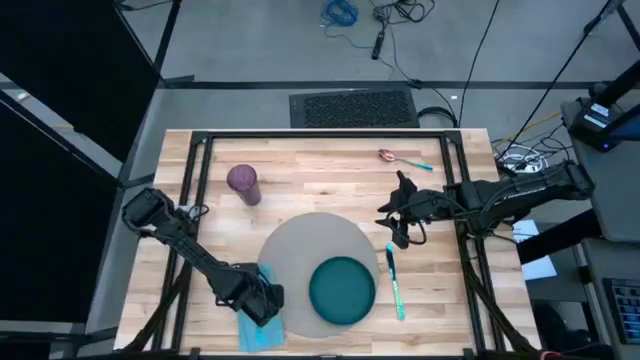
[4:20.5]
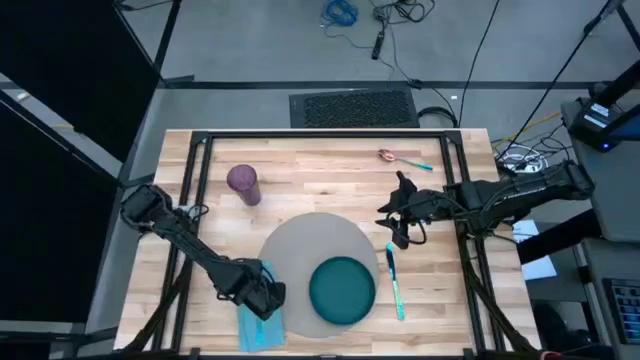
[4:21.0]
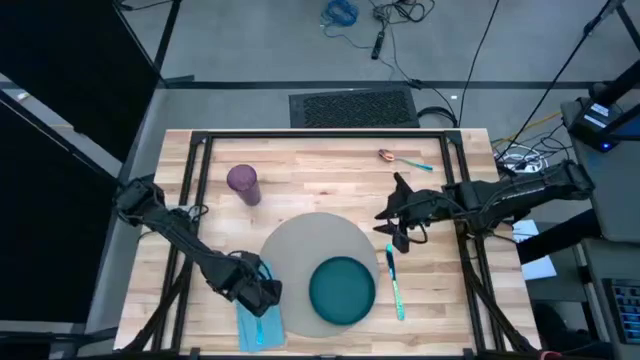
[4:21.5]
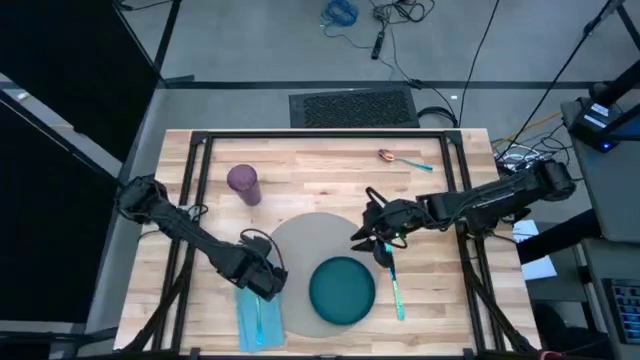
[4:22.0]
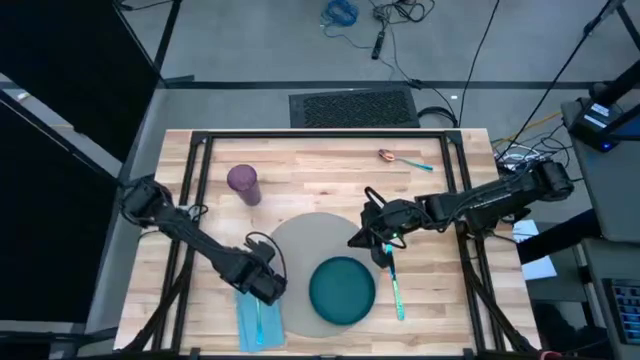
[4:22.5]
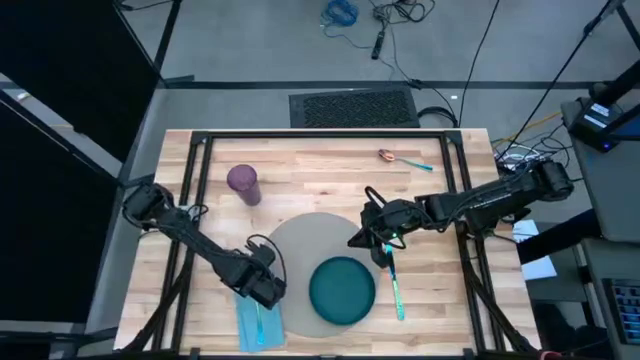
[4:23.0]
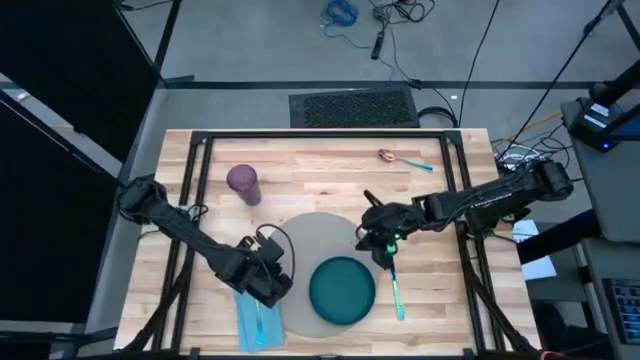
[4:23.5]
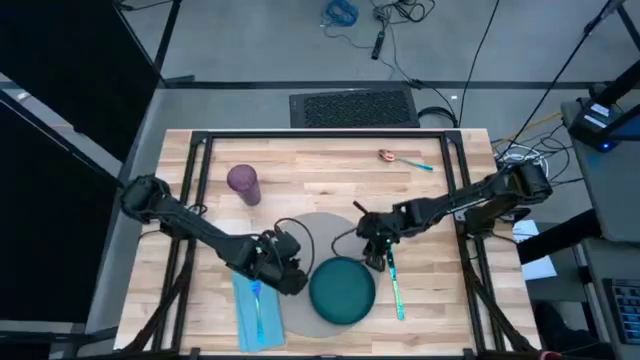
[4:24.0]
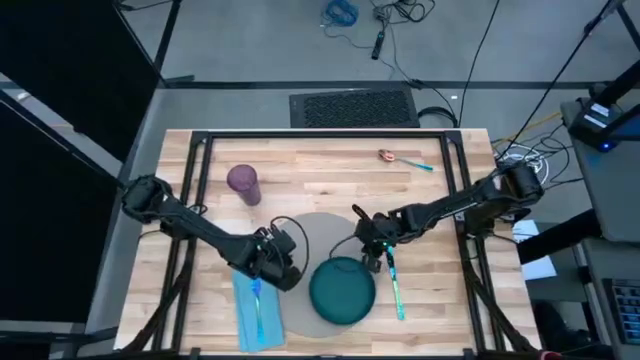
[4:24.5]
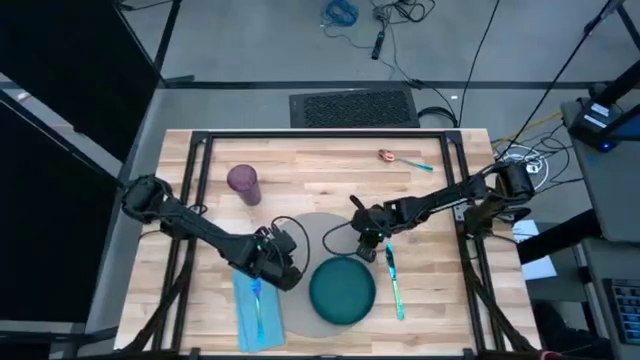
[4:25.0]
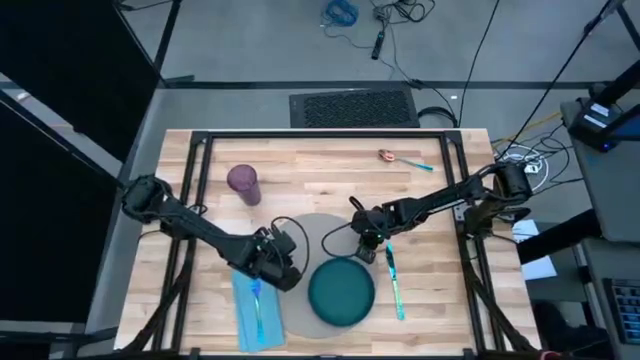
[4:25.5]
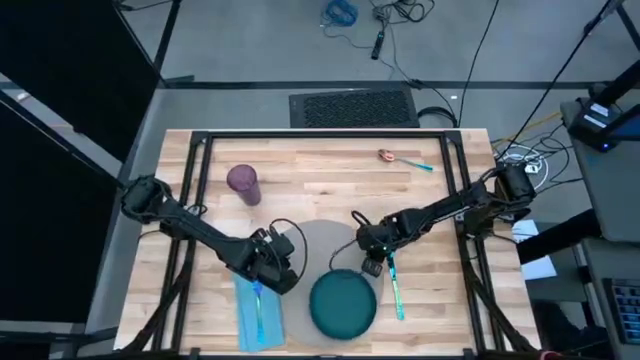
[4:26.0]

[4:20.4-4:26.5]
Task: Set table place
Adjust the gray mat

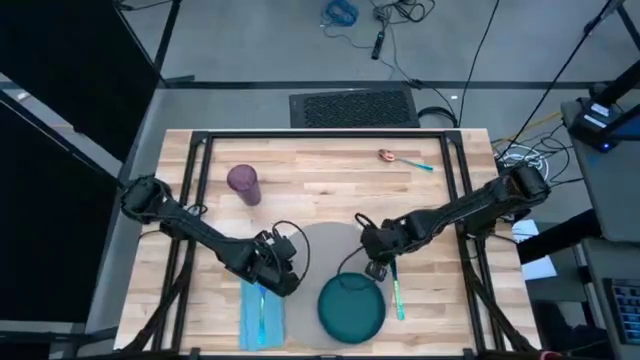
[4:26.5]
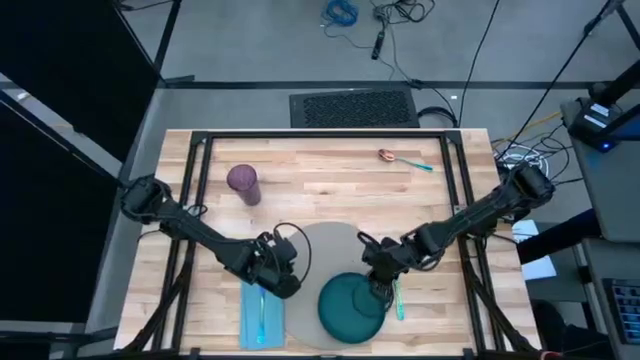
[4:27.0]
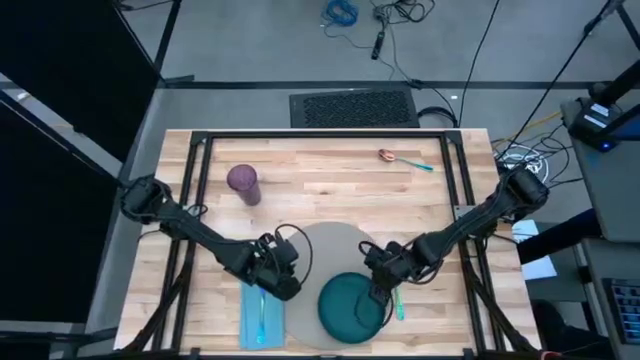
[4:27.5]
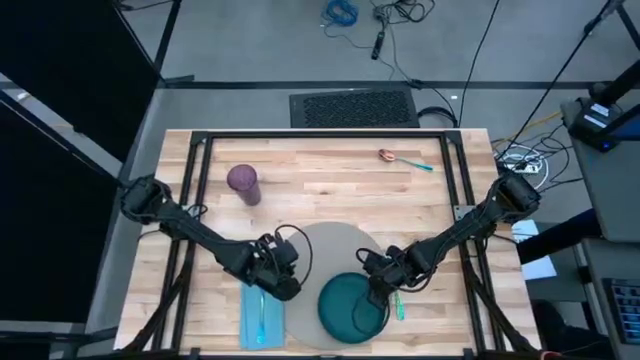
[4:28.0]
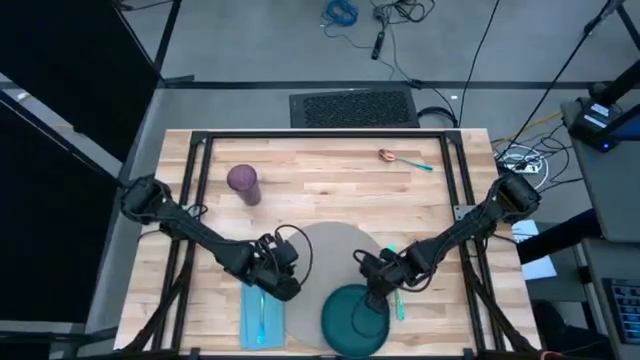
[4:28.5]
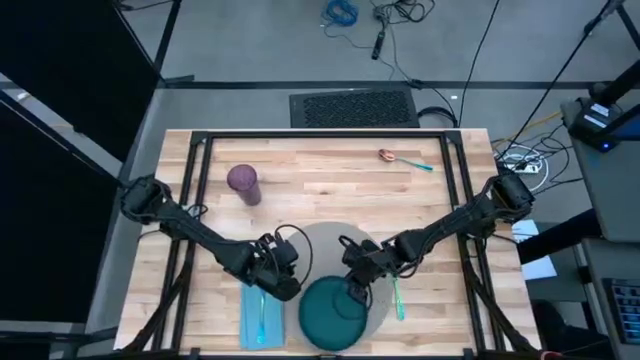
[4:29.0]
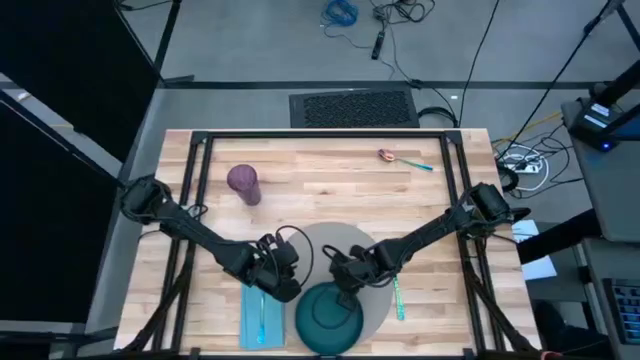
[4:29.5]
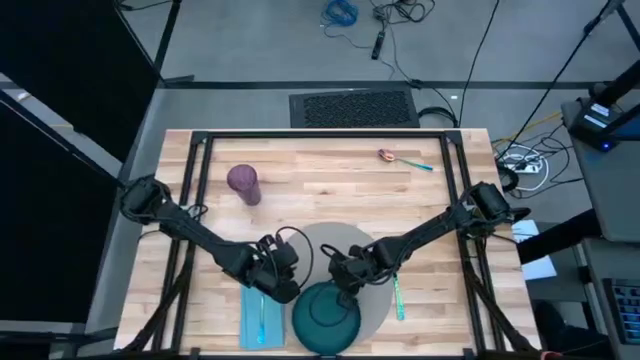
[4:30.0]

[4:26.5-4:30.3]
Adjust the dark green plate on the gray mat

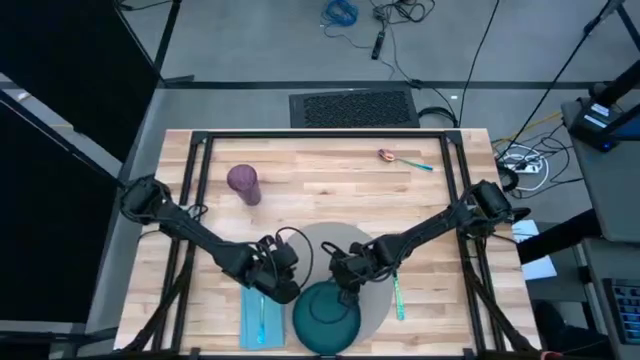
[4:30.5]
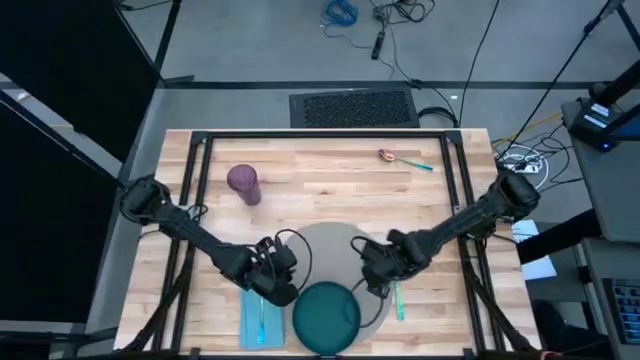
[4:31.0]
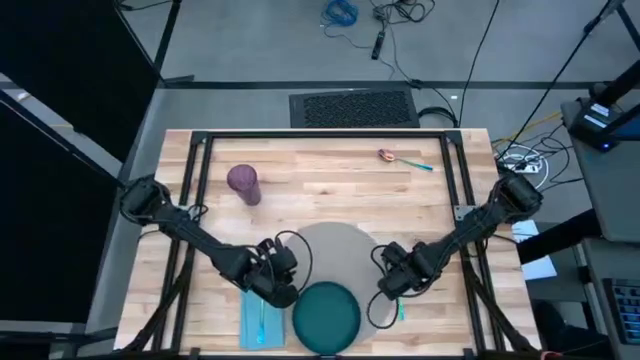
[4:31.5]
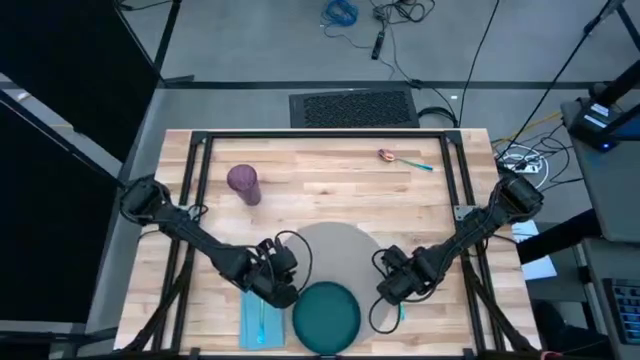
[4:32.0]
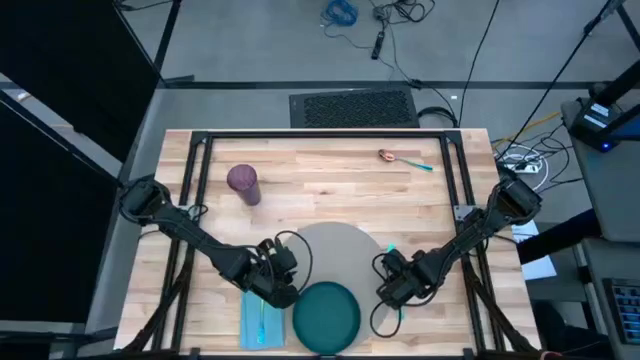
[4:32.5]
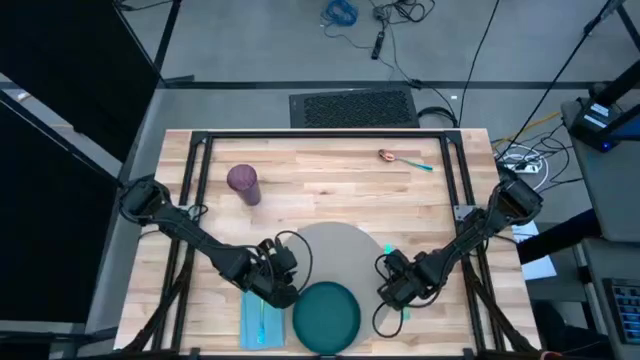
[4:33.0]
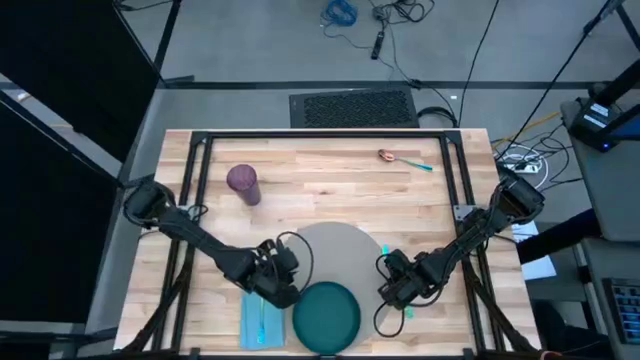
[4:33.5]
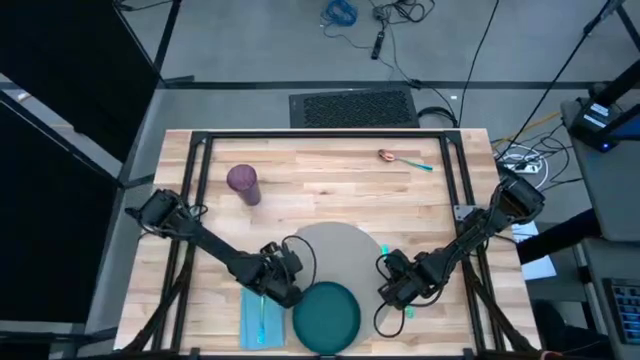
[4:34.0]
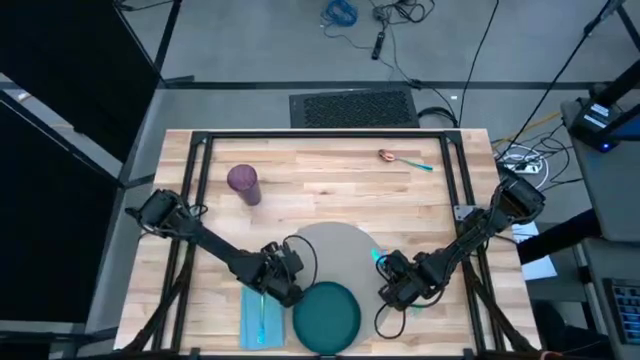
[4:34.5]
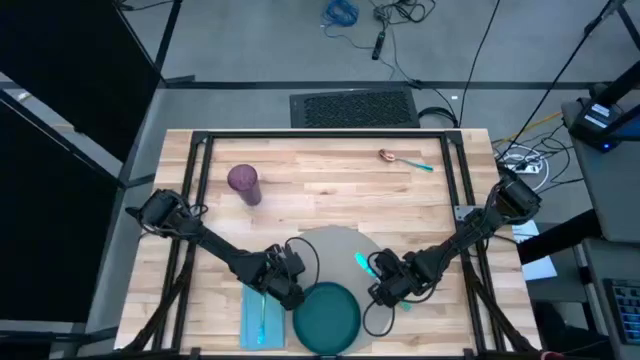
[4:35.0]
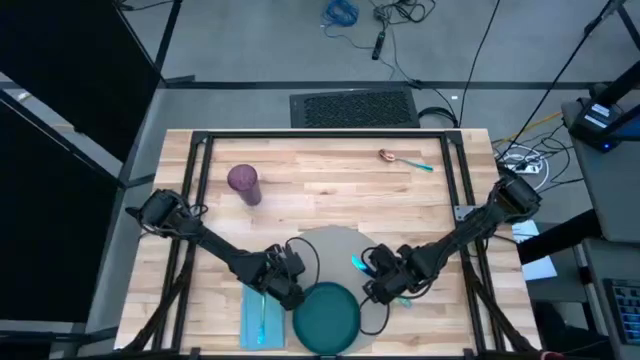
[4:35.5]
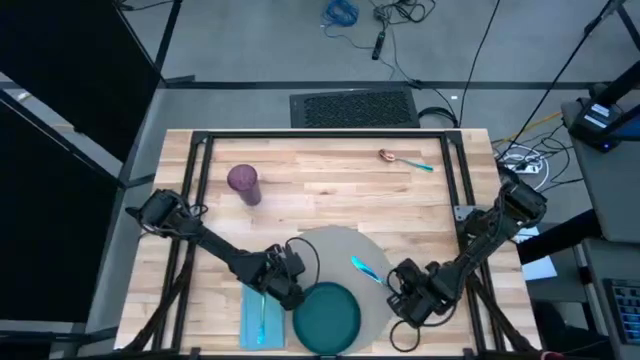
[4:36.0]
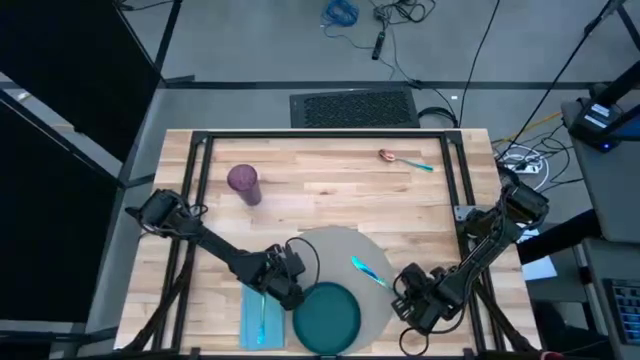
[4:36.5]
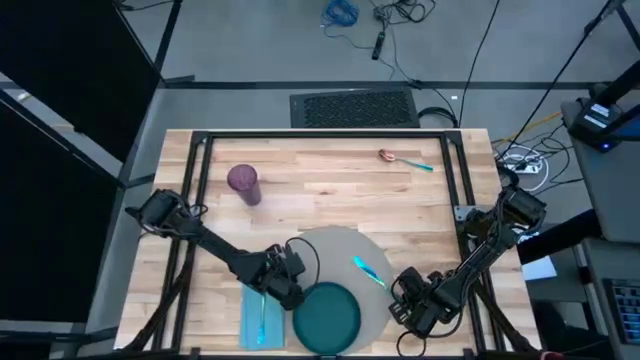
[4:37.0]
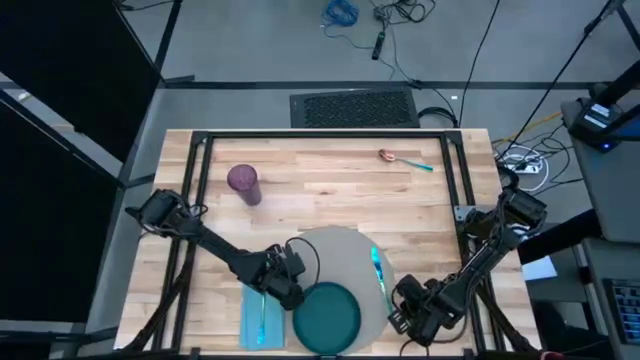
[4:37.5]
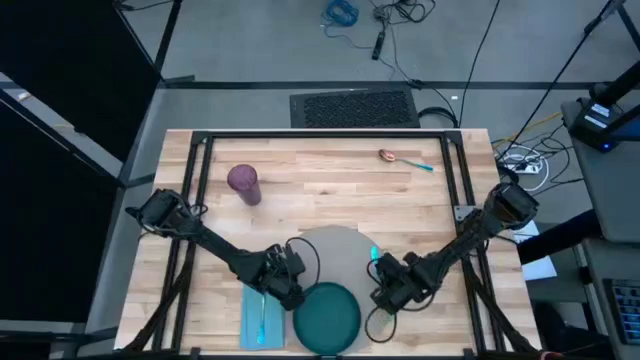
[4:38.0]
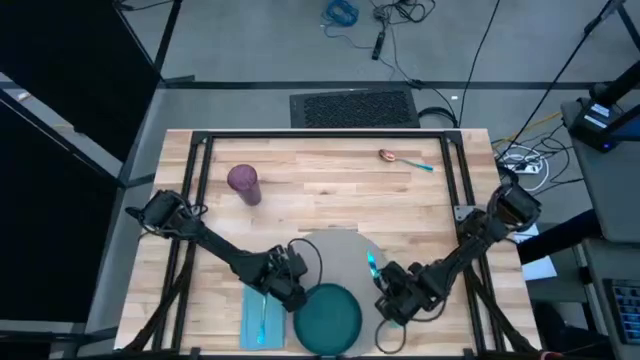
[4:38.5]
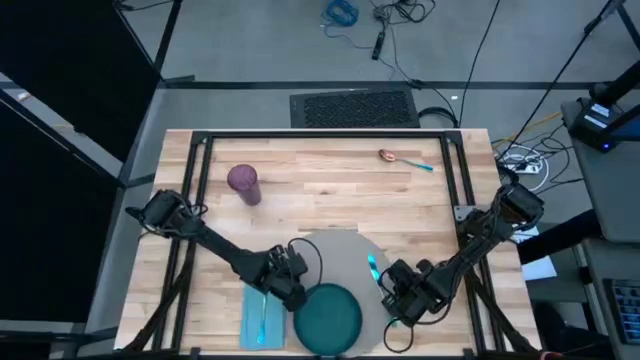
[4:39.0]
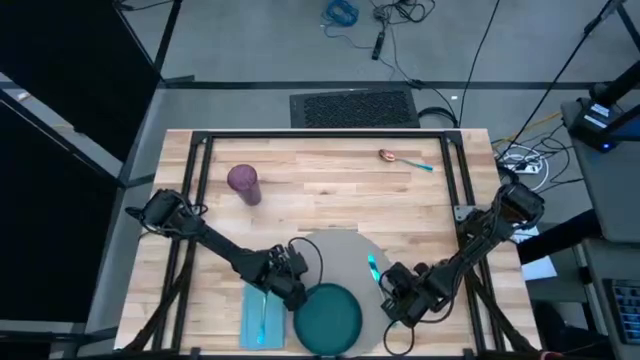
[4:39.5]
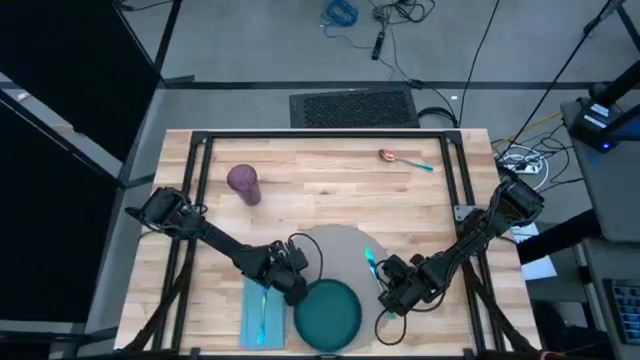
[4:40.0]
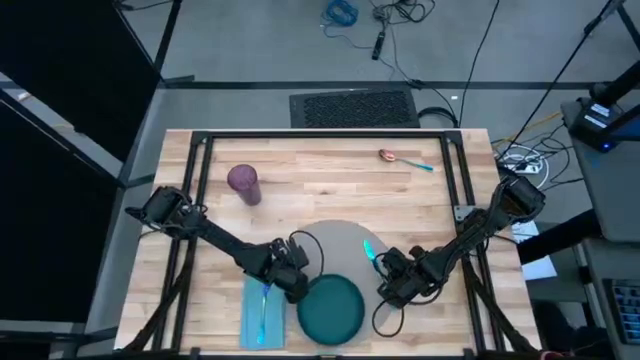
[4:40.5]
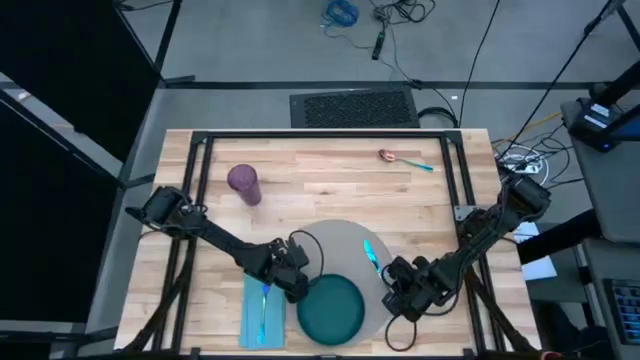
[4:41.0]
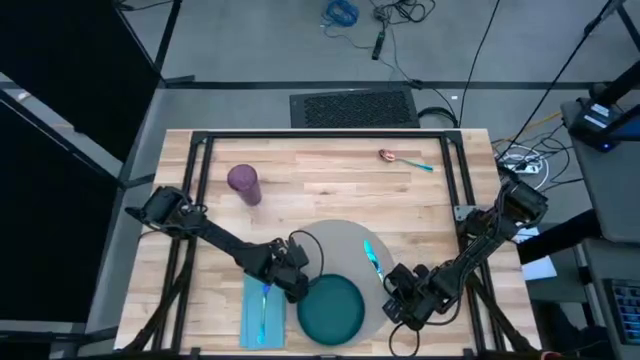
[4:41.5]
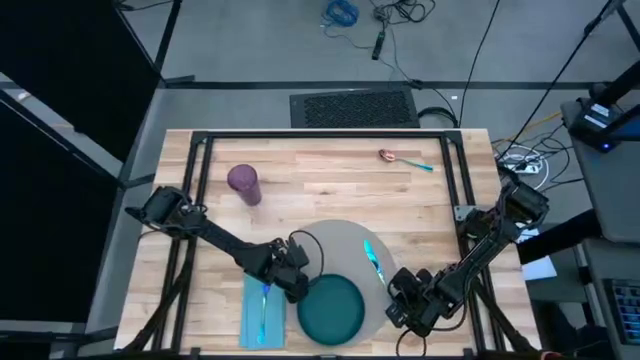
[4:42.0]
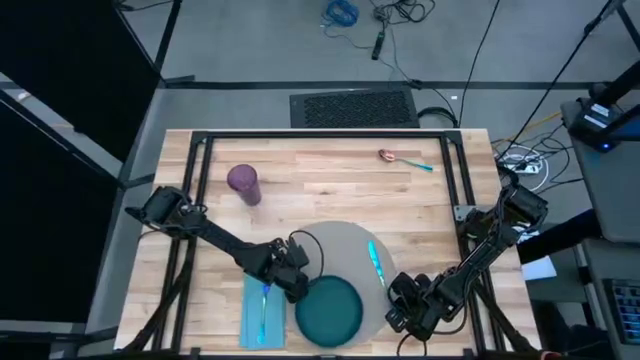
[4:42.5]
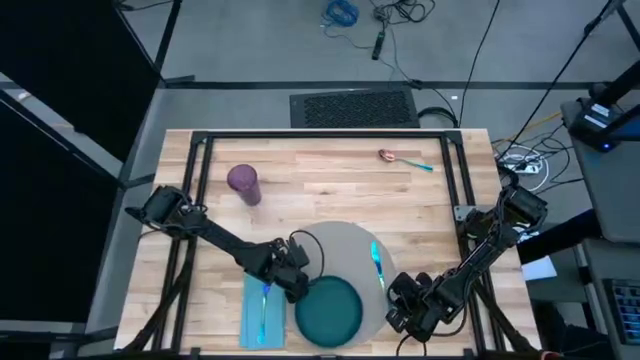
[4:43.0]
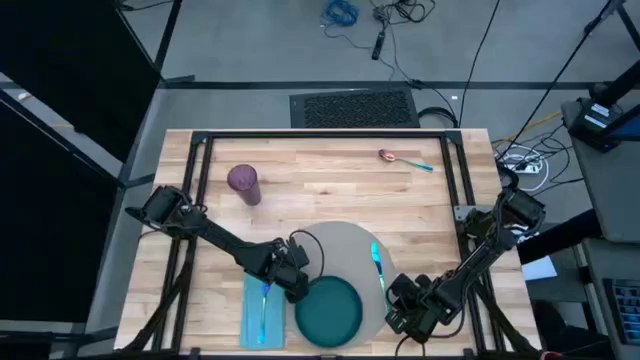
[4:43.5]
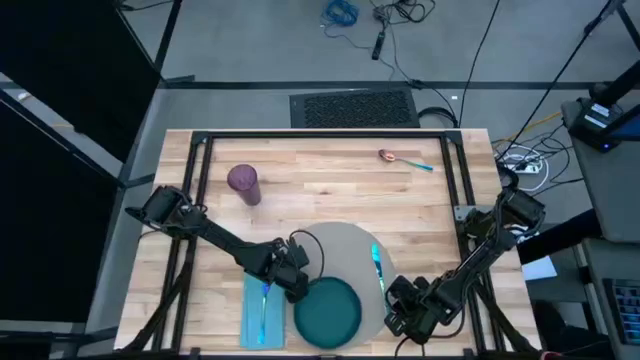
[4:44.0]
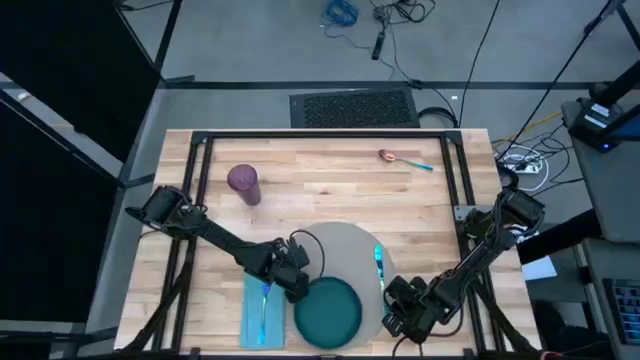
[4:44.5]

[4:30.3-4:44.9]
Put the iridescent knife on the gray mat
